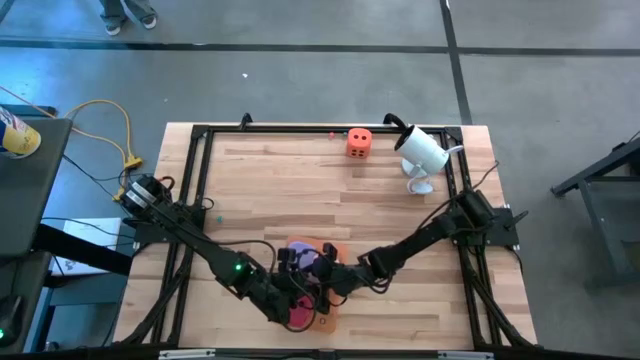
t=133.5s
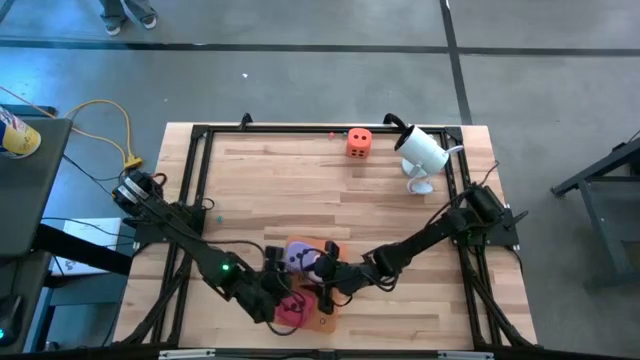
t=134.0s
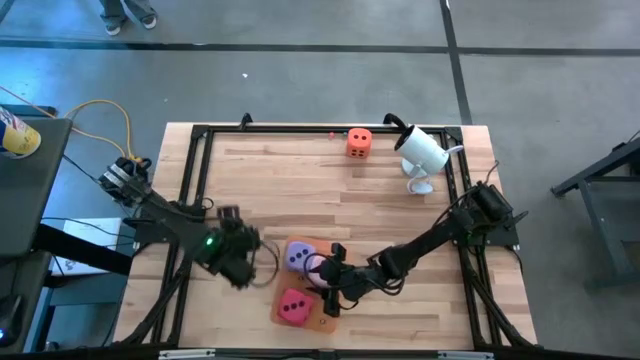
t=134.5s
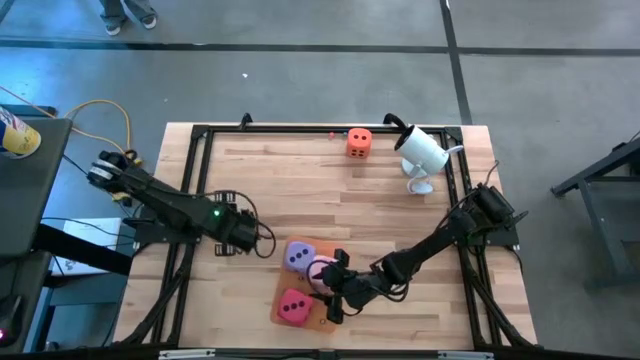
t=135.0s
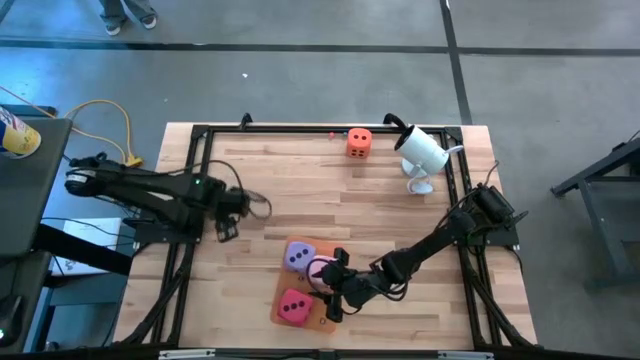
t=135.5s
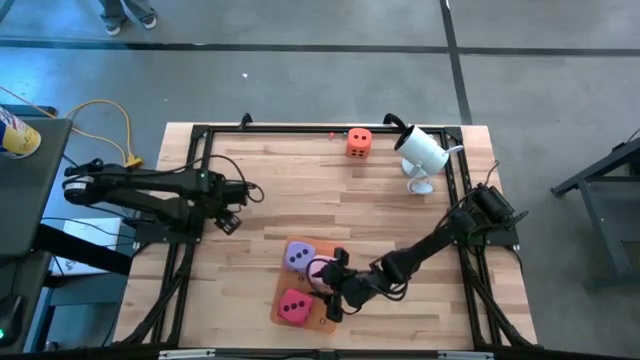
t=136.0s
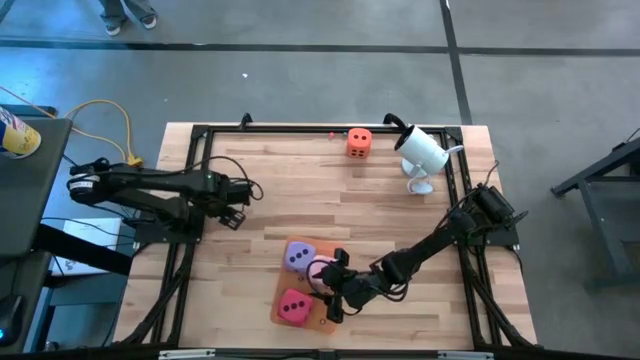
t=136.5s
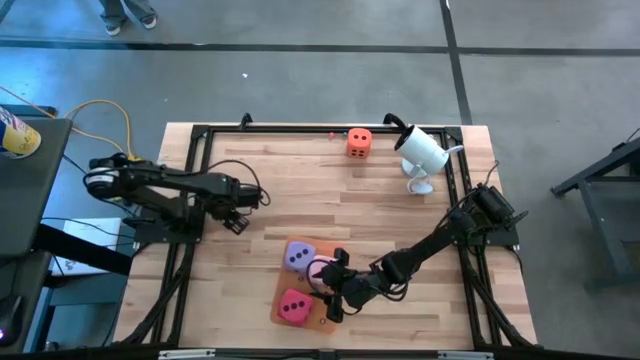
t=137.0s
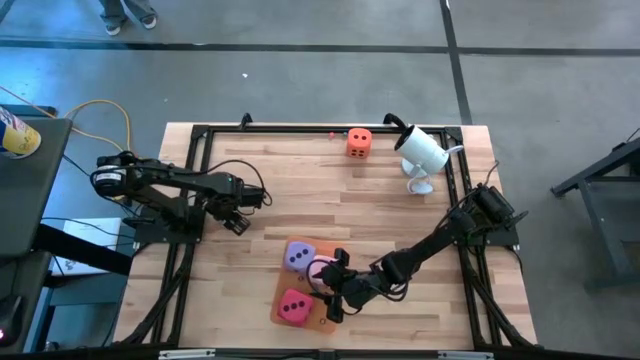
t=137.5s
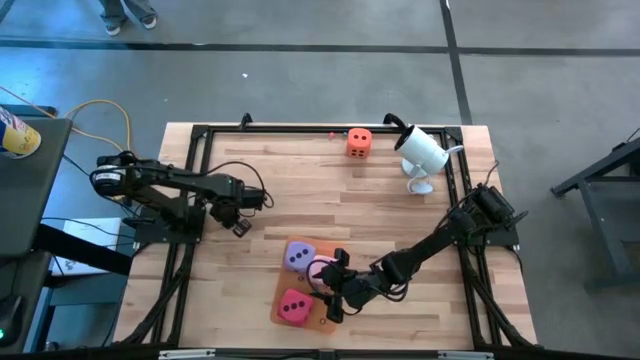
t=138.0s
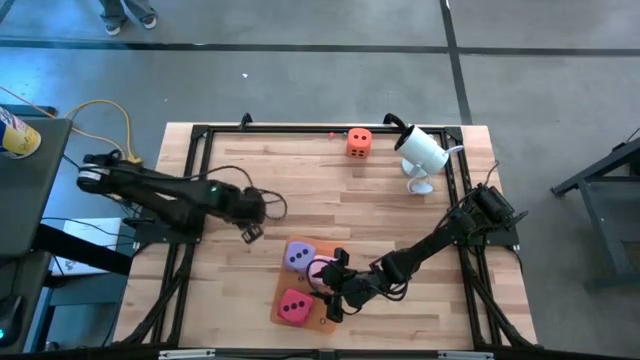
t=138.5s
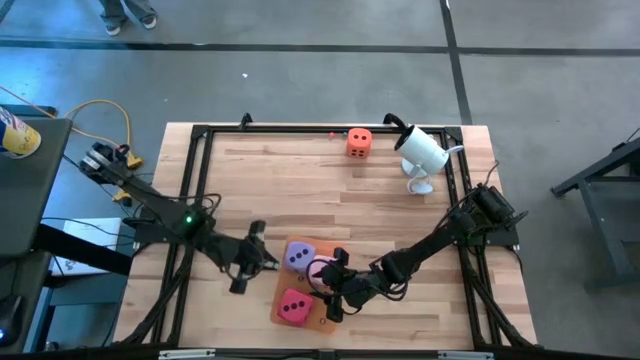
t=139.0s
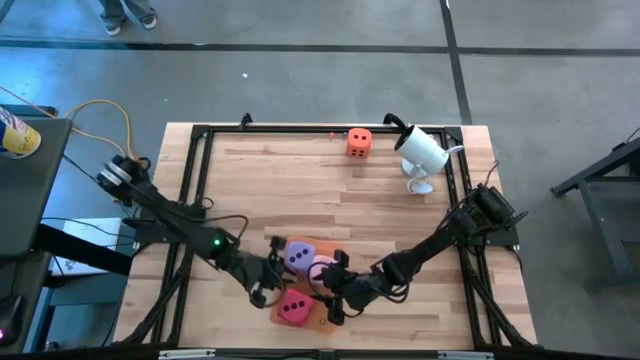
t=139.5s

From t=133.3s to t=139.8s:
Task: Pick & Place Dice
Put the bottom small light blue dice into the orange bin

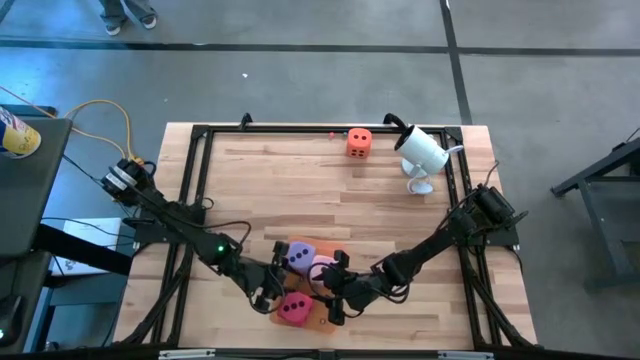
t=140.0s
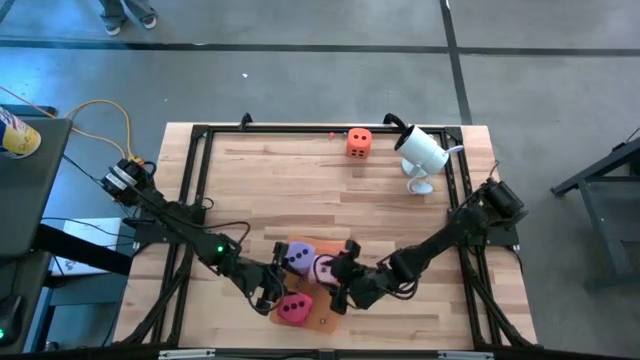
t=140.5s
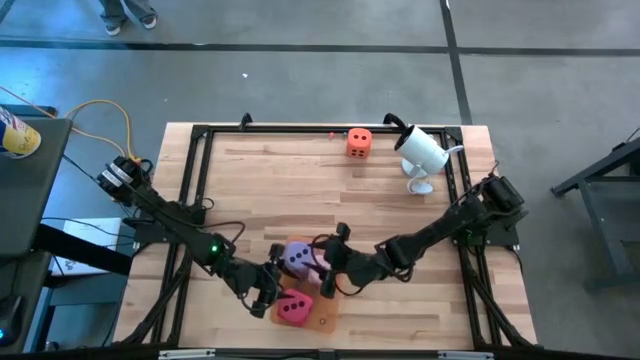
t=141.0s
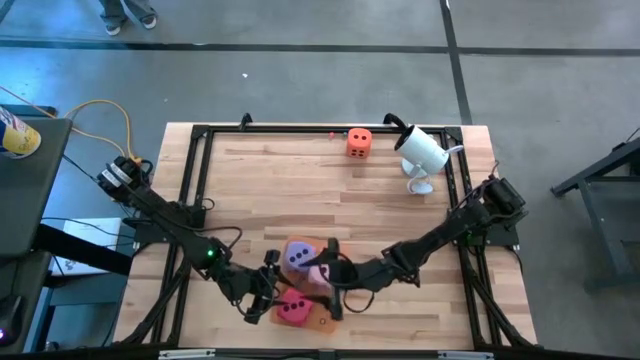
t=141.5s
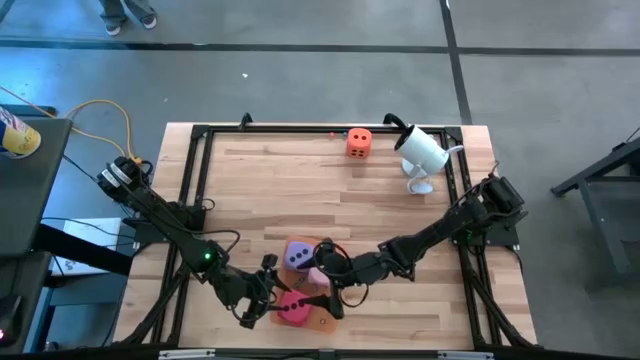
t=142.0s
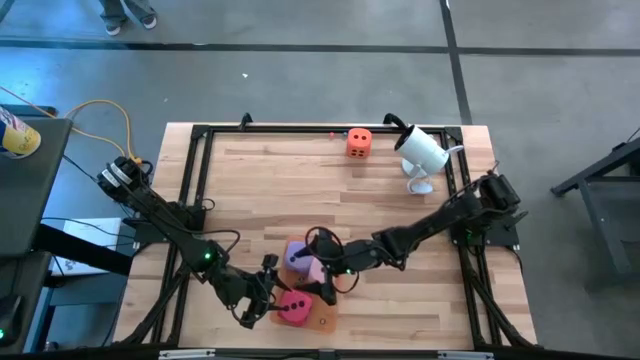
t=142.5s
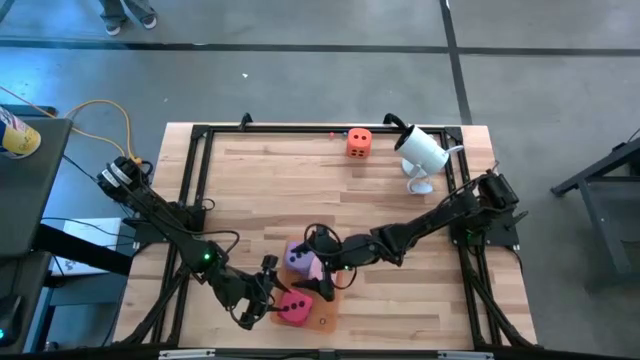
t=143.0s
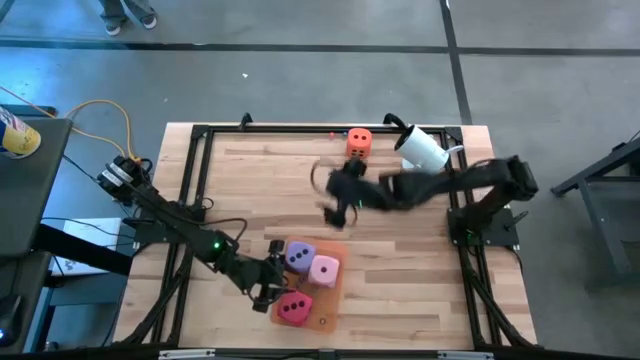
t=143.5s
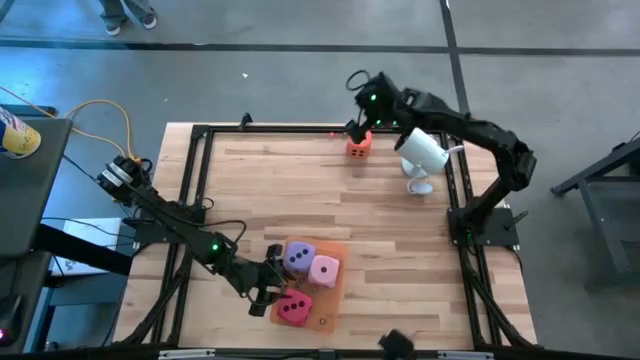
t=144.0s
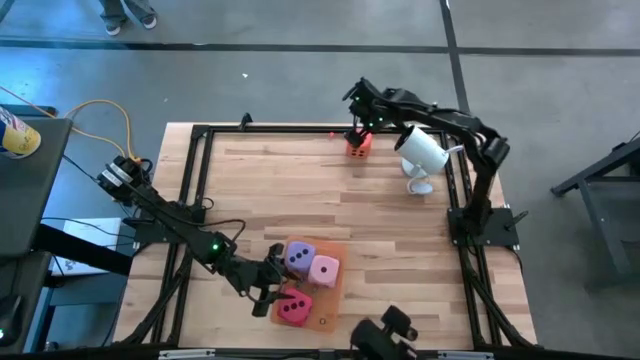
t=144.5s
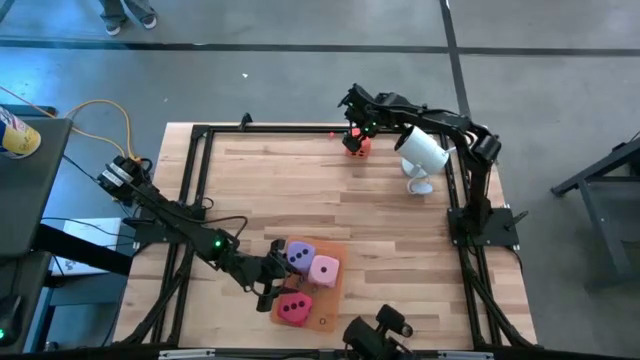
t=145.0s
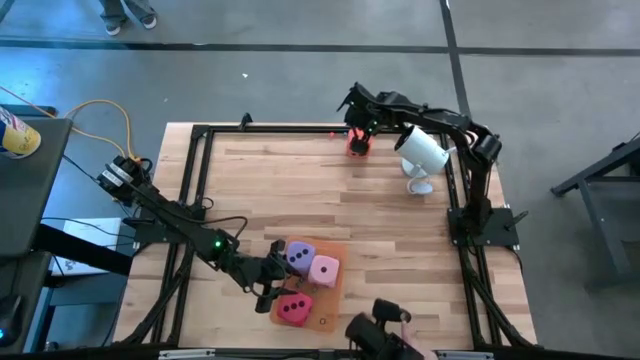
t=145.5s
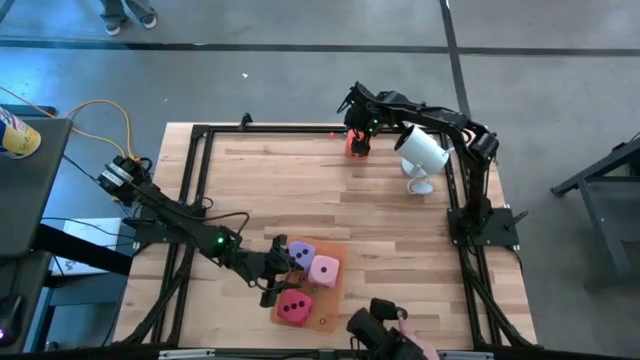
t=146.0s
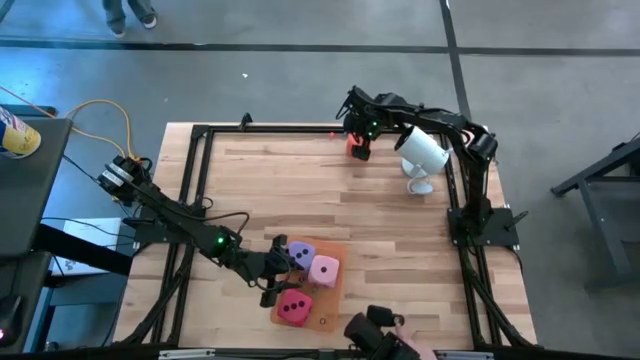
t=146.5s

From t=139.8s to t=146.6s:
Put the large orange dice into the orange bin

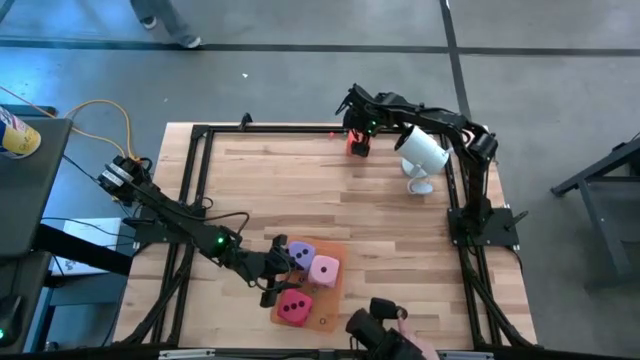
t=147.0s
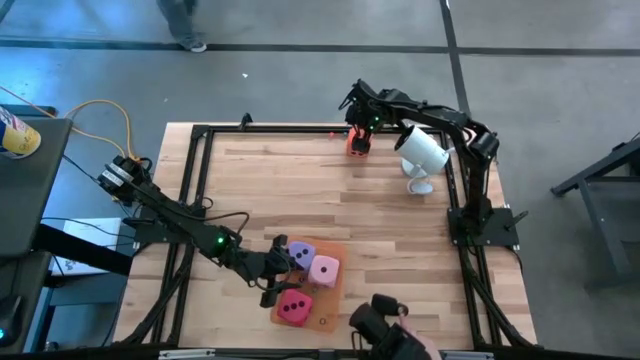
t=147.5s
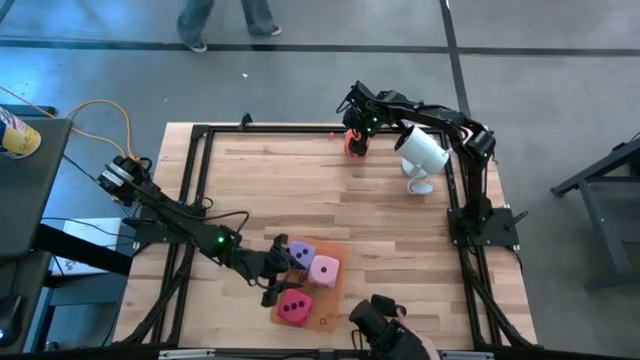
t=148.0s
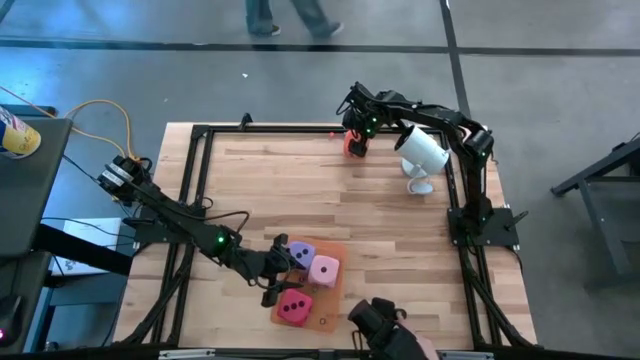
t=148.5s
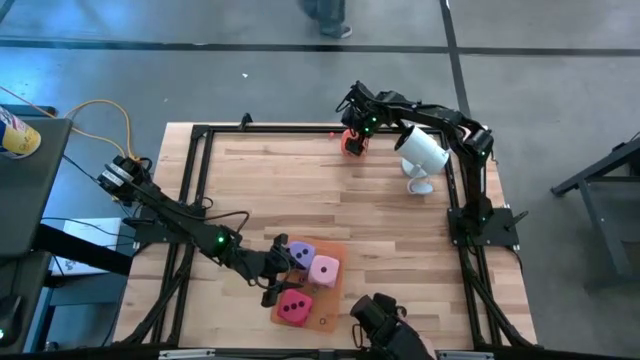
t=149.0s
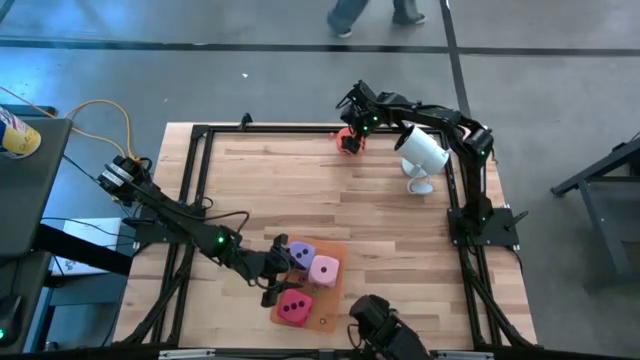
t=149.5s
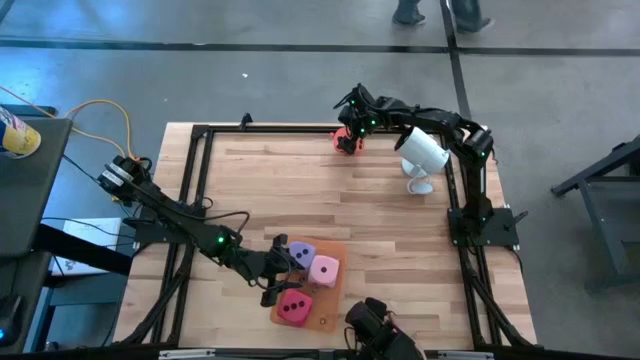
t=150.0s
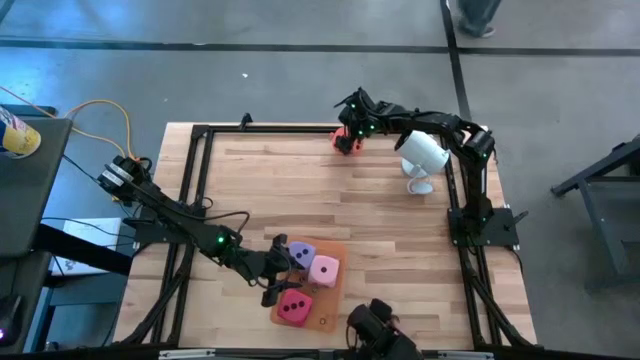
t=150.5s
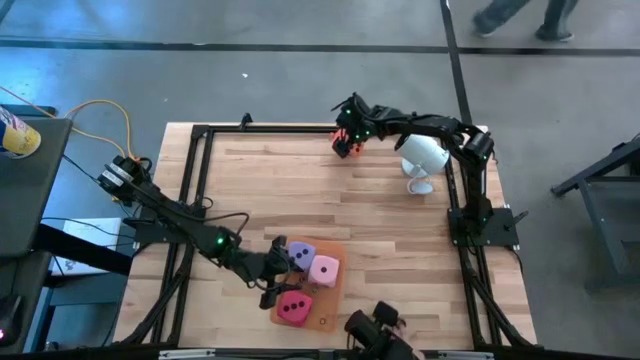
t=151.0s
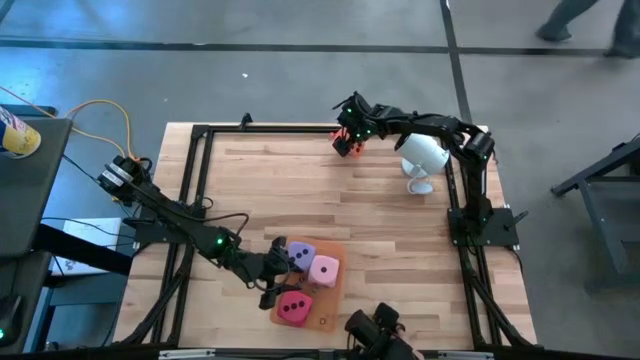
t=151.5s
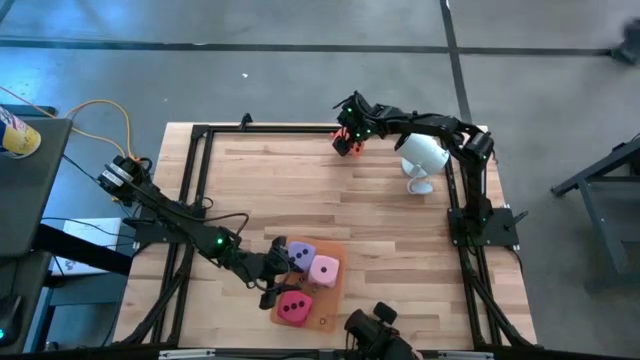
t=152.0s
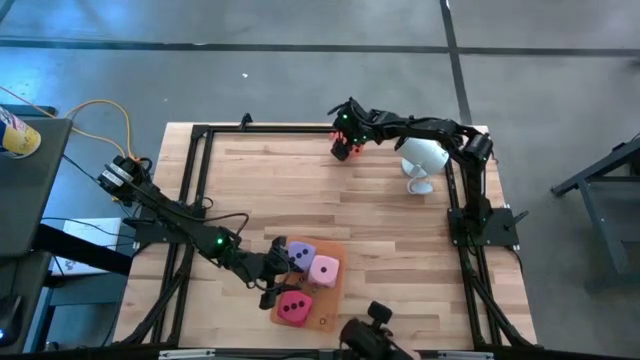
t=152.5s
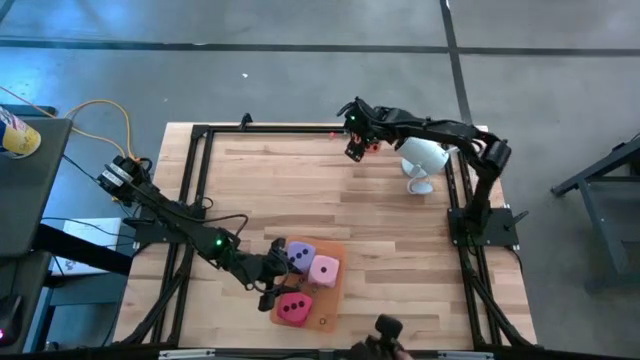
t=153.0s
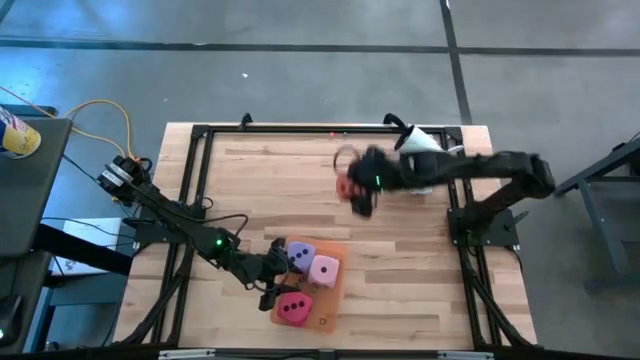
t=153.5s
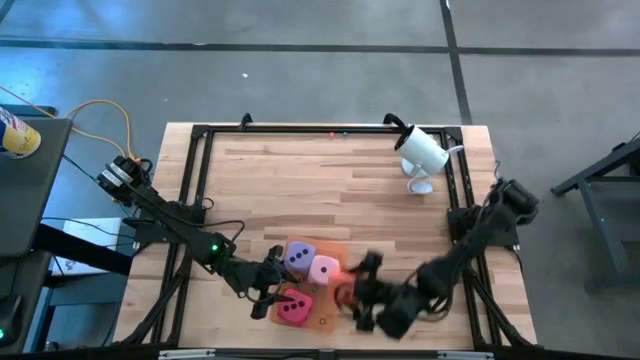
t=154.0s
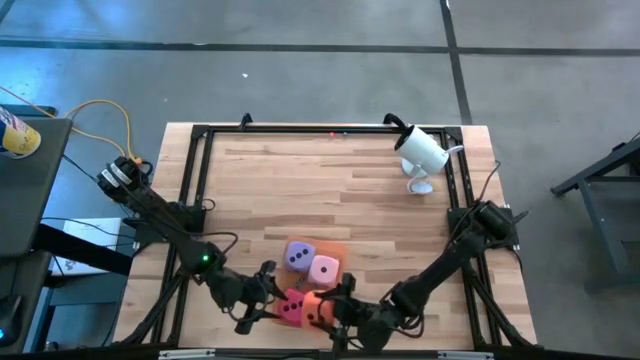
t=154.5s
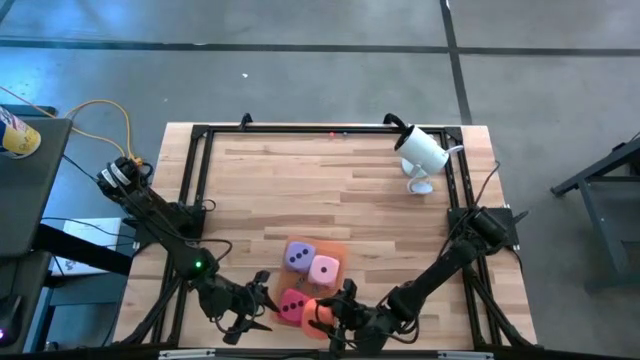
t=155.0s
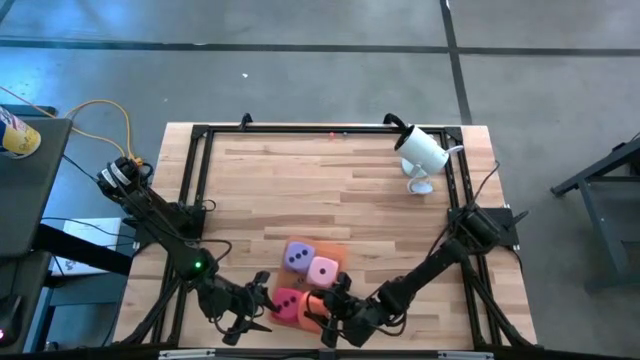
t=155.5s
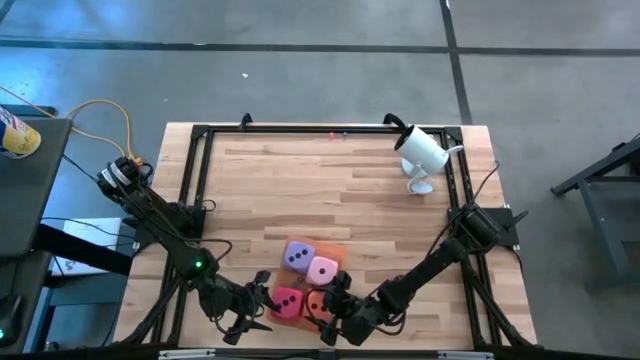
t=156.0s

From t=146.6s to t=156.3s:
Put the large orange dice into the orange bin
